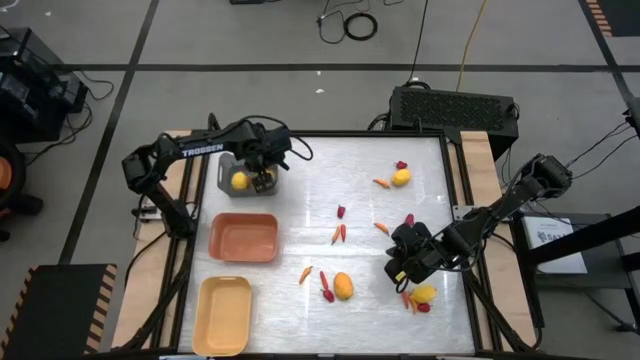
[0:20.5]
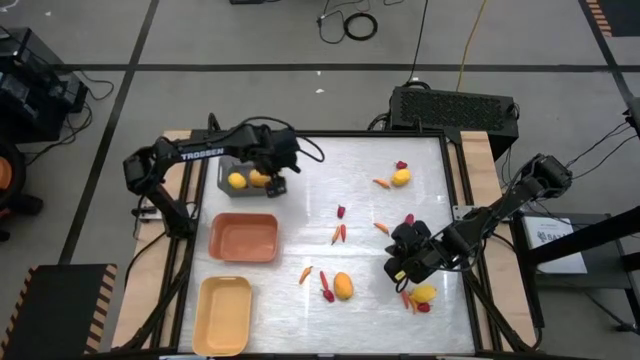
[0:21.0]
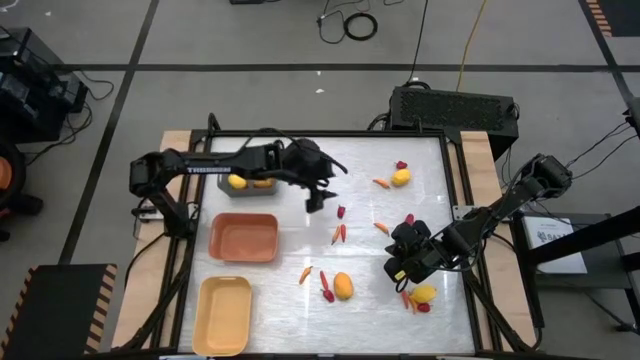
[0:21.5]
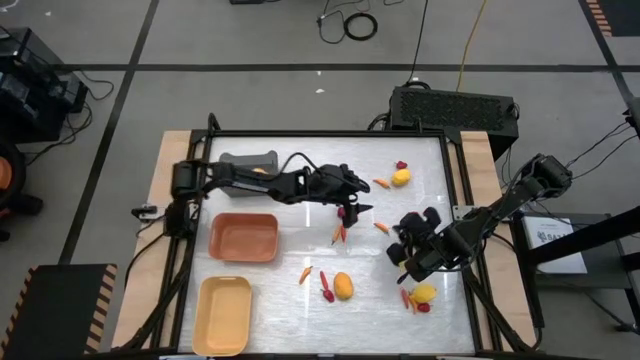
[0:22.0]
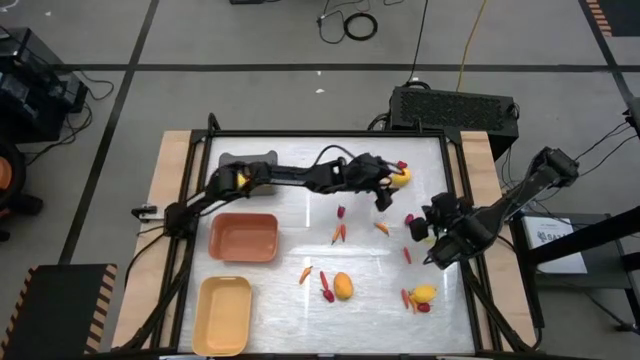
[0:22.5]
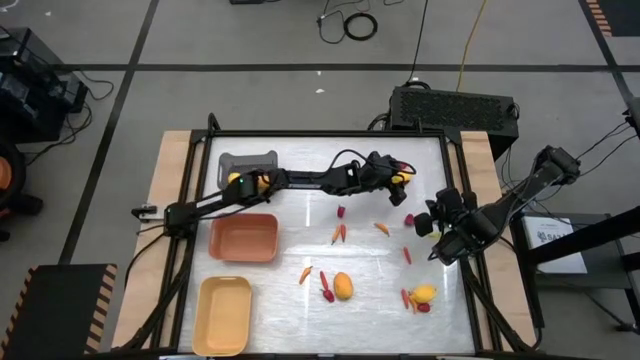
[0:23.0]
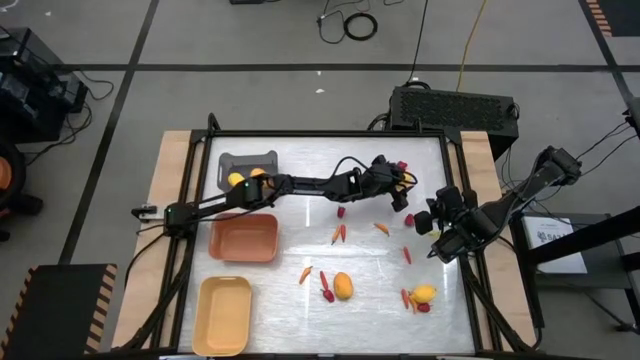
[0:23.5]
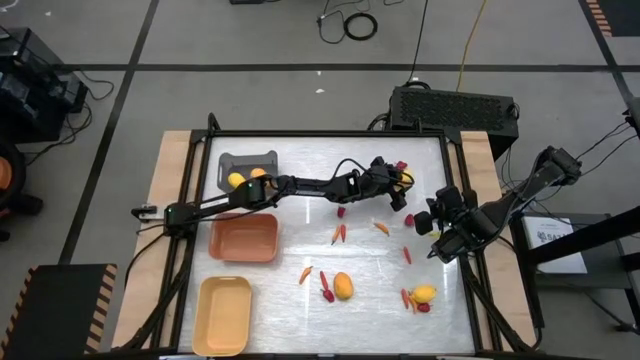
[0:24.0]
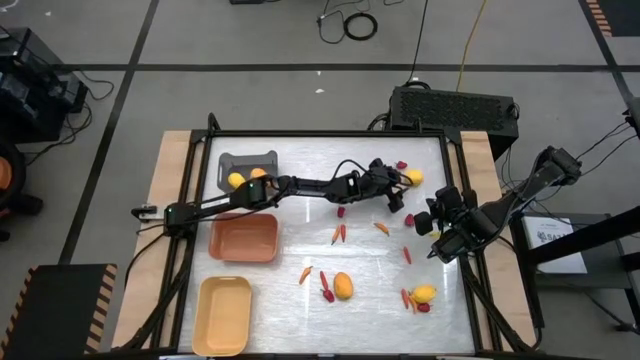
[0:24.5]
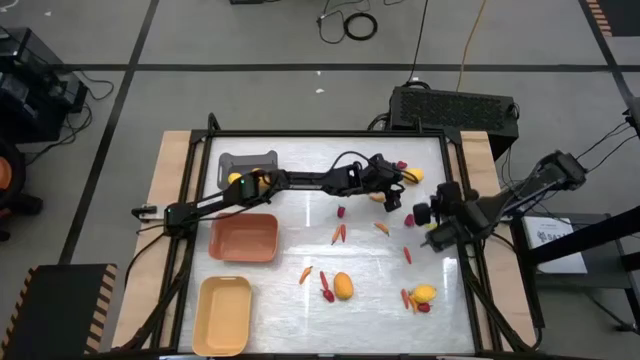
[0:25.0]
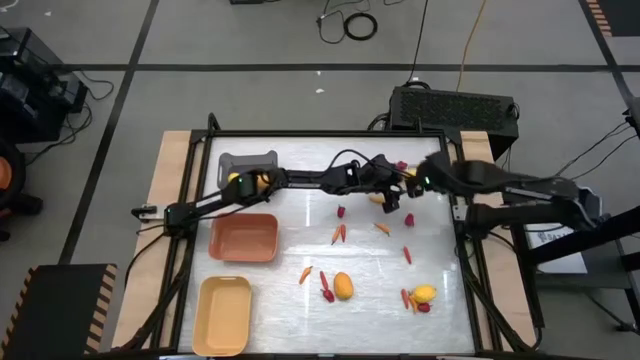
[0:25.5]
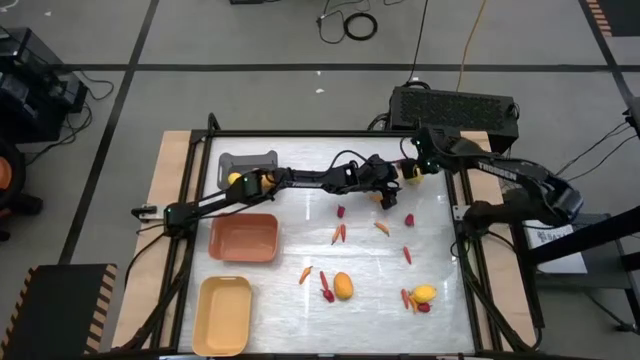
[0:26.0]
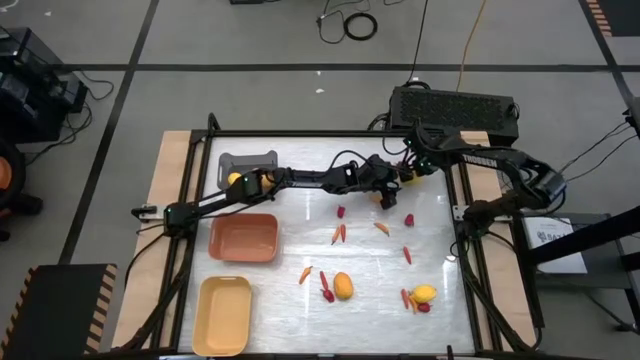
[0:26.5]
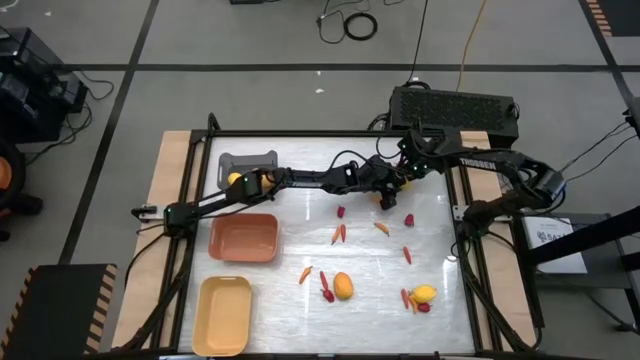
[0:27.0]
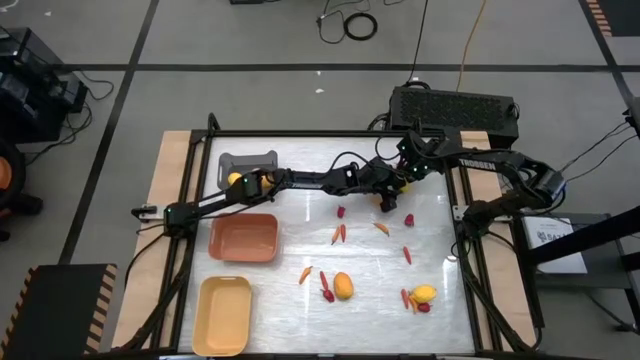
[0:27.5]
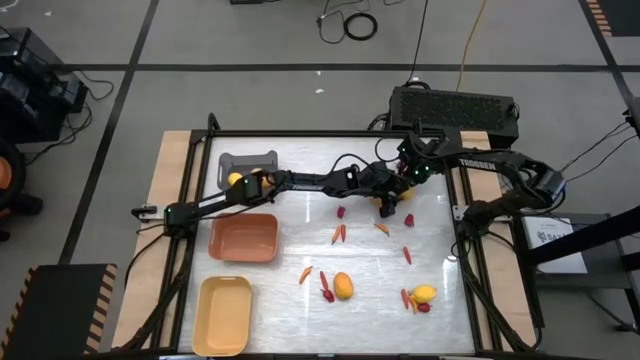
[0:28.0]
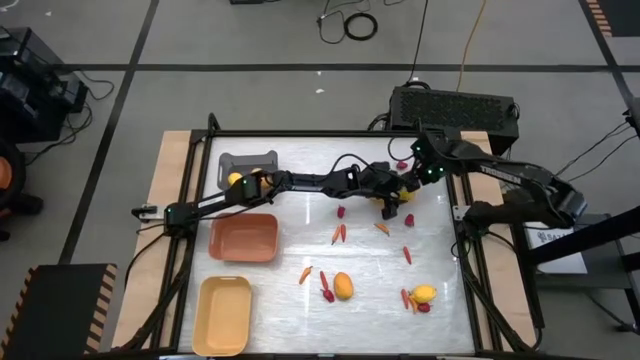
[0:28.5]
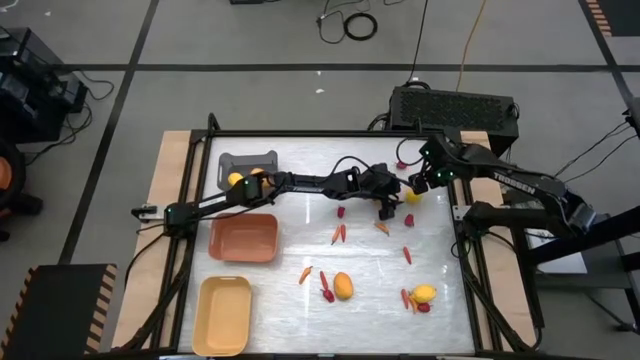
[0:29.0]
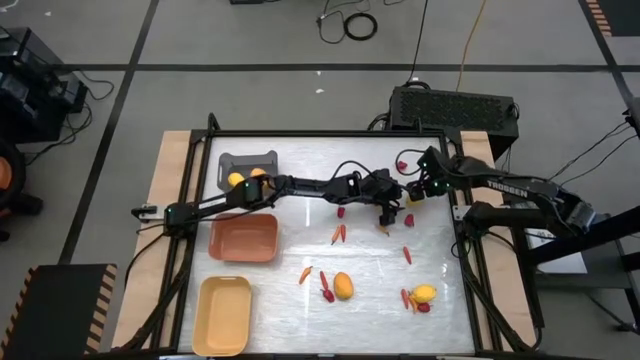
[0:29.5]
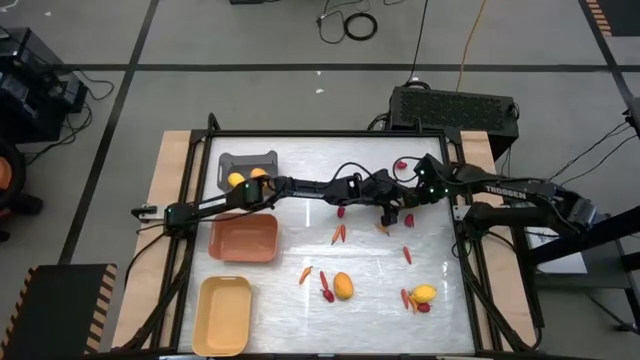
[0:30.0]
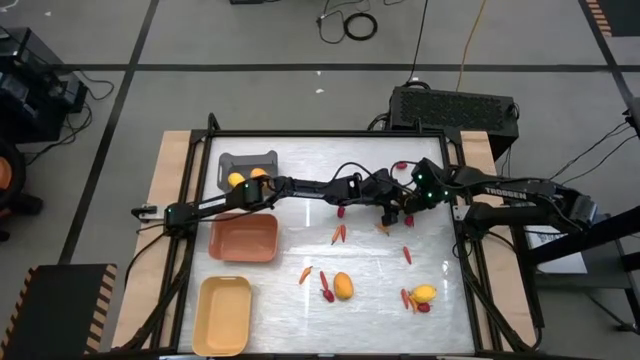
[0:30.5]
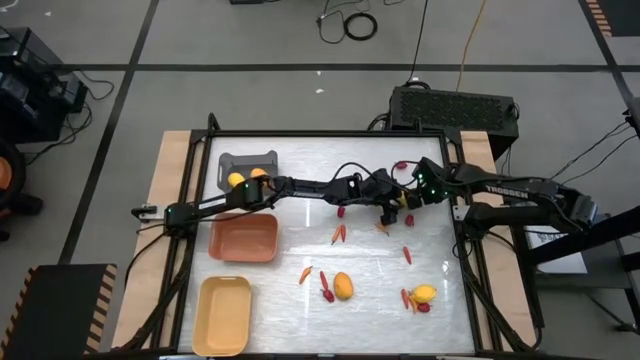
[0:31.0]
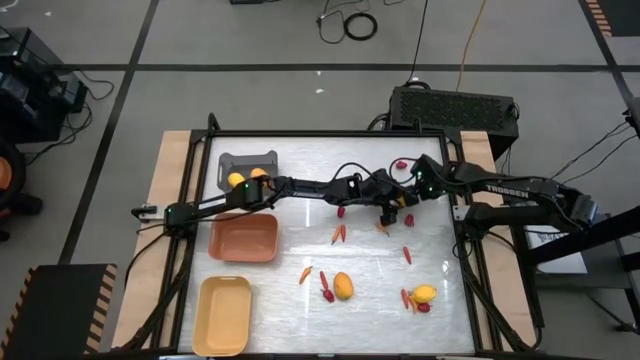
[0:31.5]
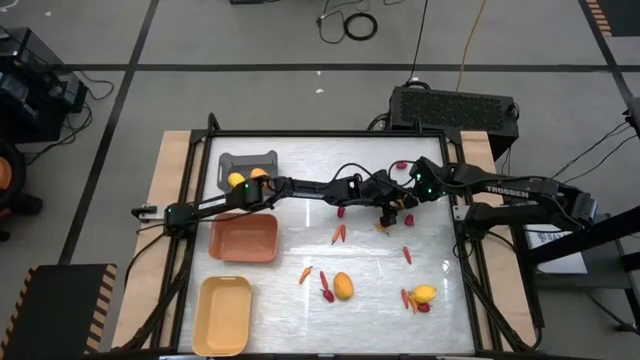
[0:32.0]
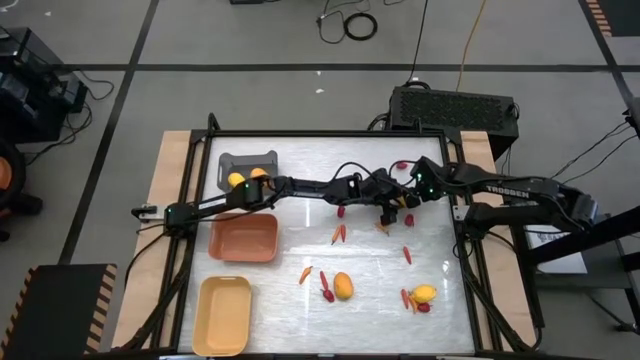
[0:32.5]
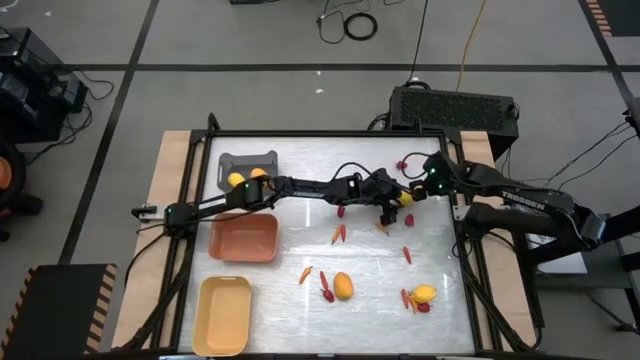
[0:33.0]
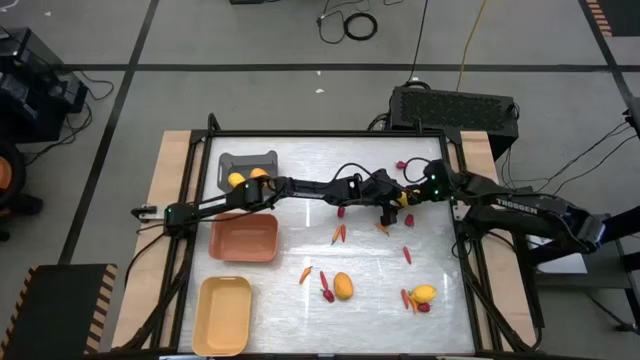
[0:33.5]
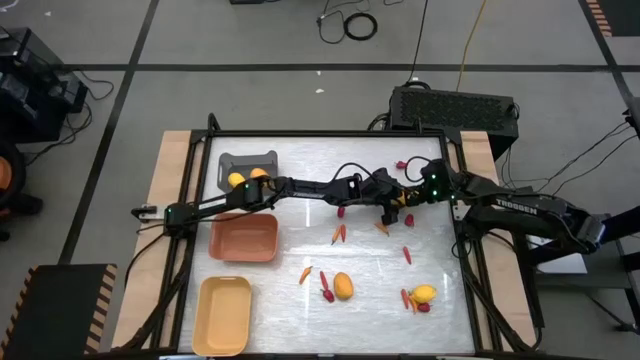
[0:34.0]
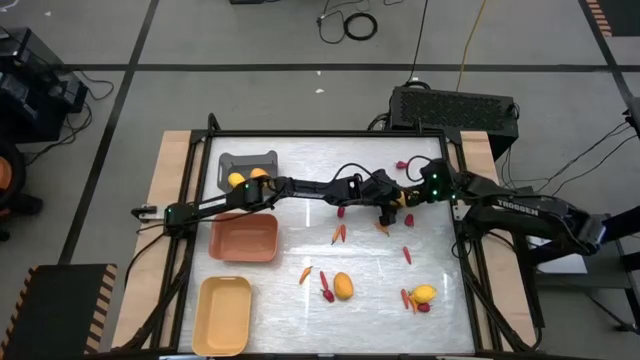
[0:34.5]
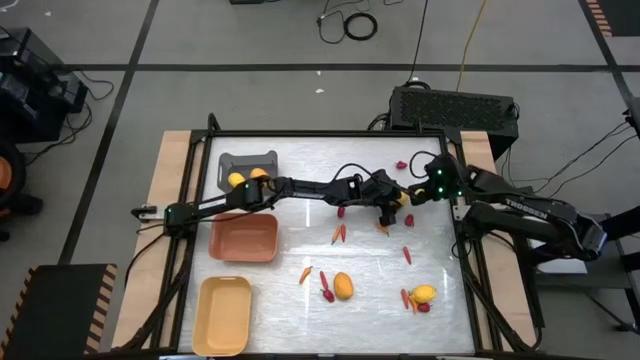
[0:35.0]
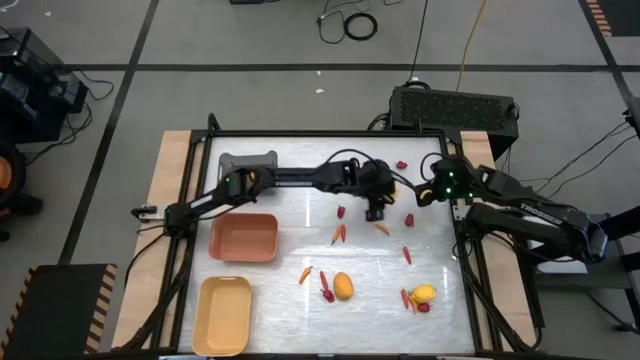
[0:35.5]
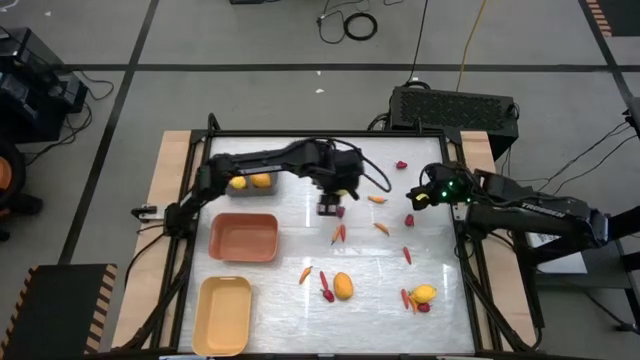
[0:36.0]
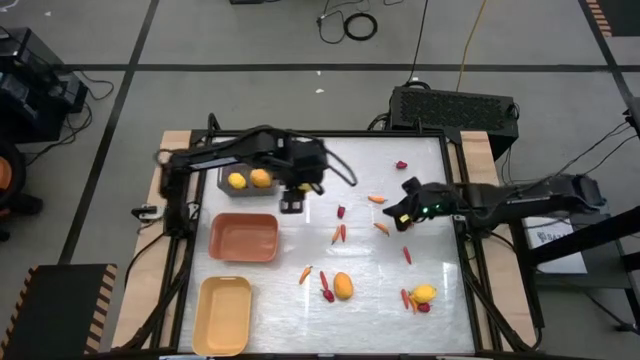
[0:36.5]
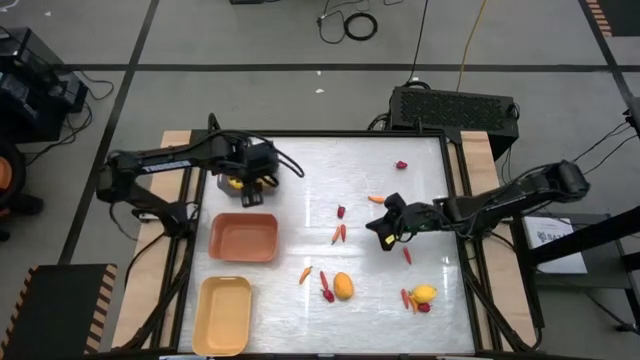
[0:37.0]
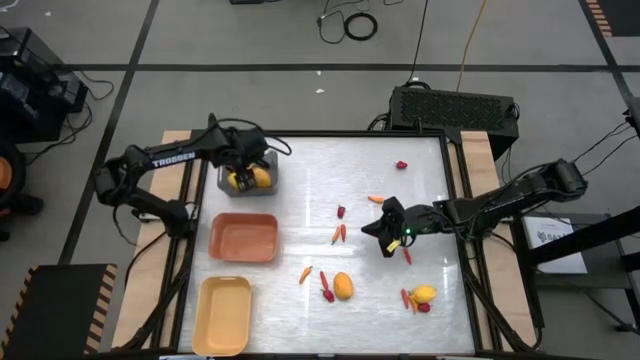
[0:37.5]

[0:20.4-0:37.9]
Task: Sort produce into baskets
Put the lemon into the black bin
